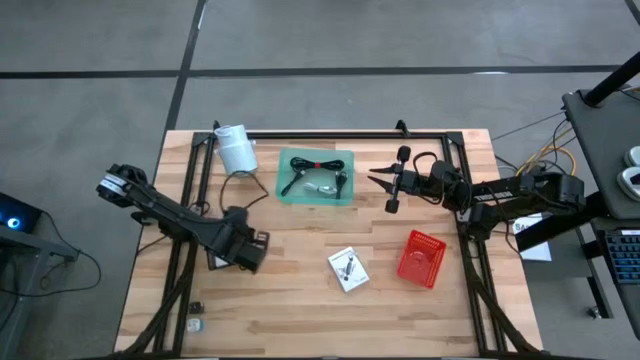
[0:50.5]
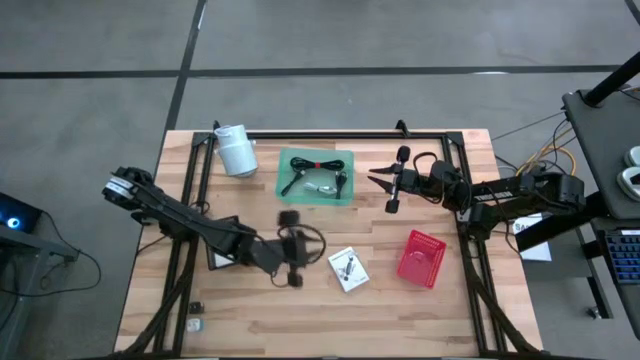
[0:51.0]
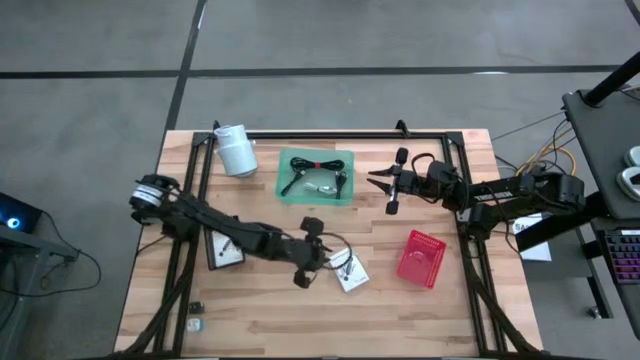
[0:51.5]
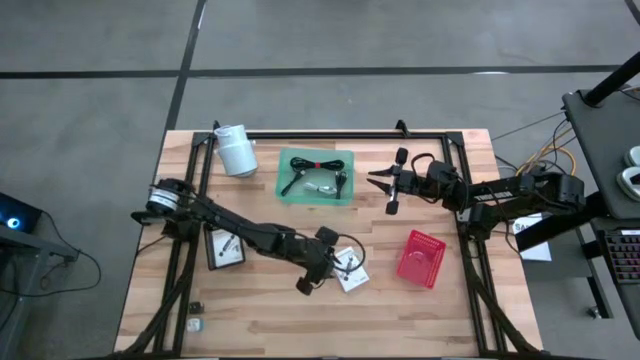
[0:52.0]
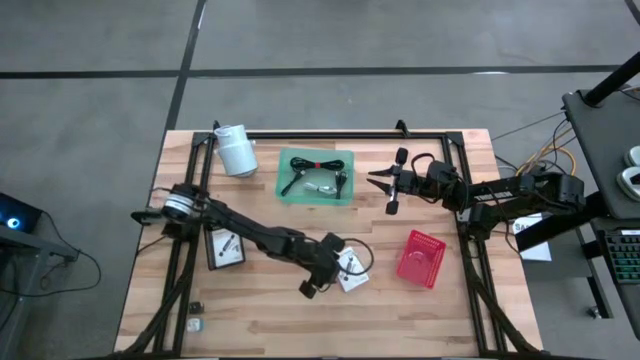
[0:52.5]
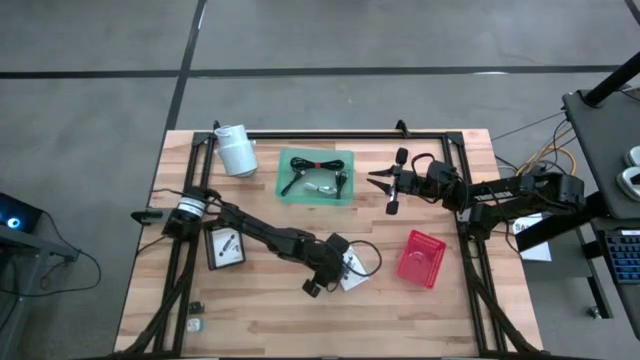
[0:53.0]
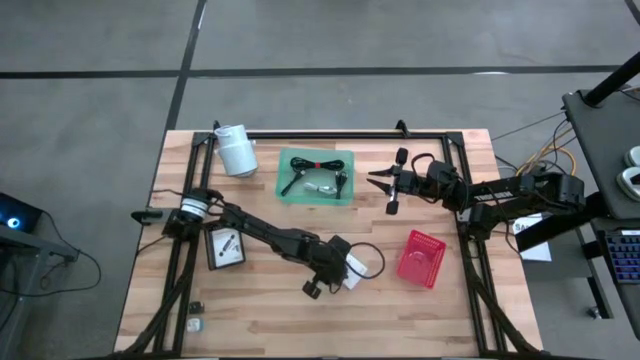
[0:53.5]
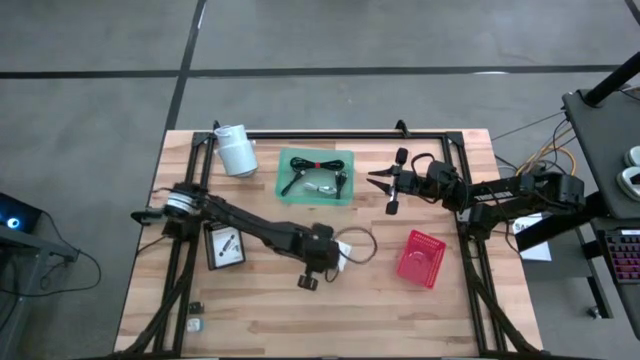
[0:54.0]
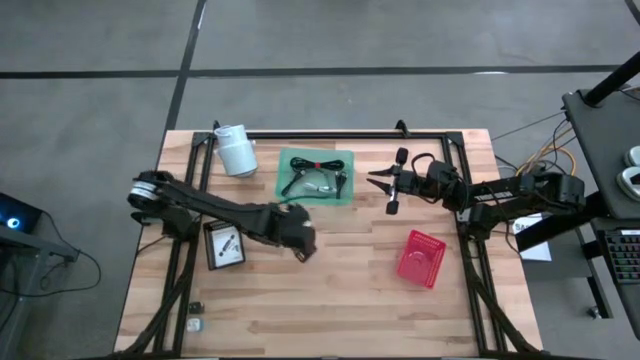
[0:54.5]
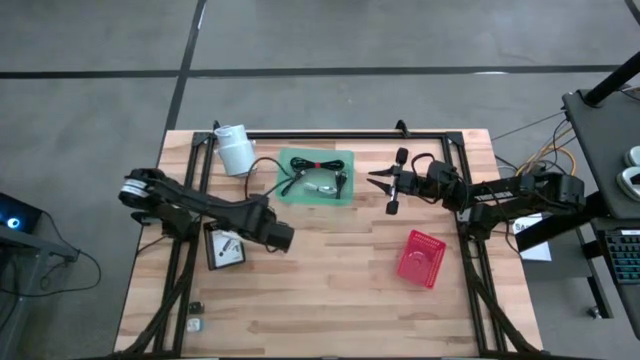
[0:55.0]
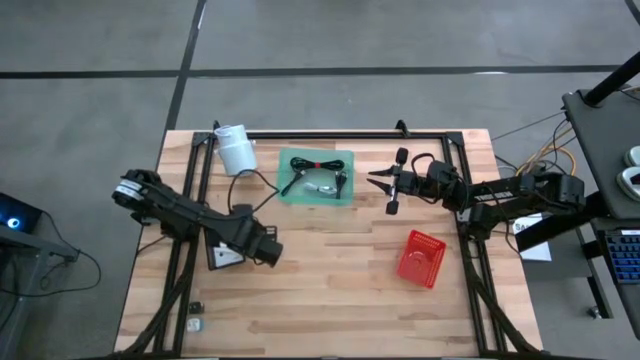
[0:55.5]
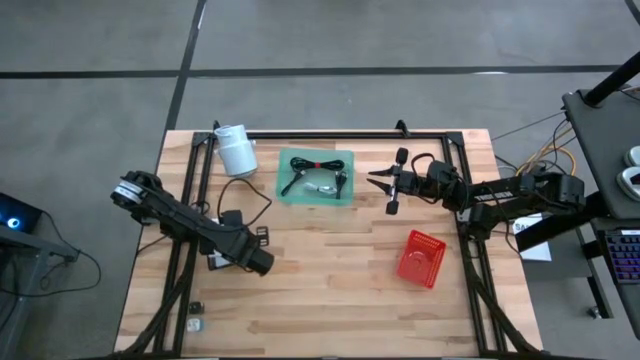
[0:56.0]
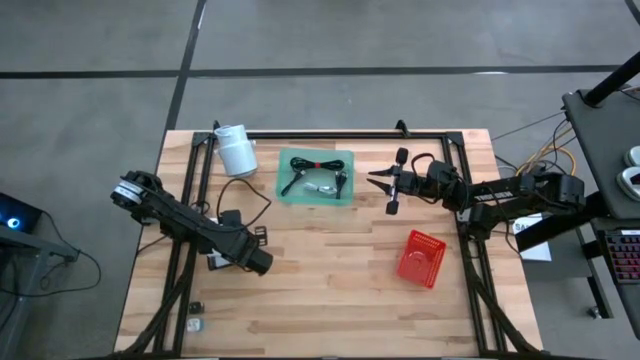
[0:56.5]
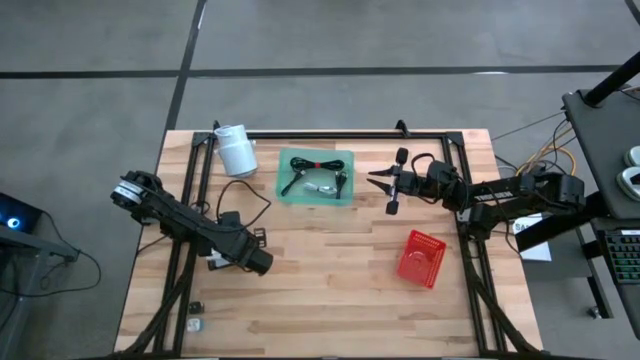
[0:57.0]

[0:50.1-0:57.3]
Task: Pick and place items into bin
Put the white card reader box into the black bin

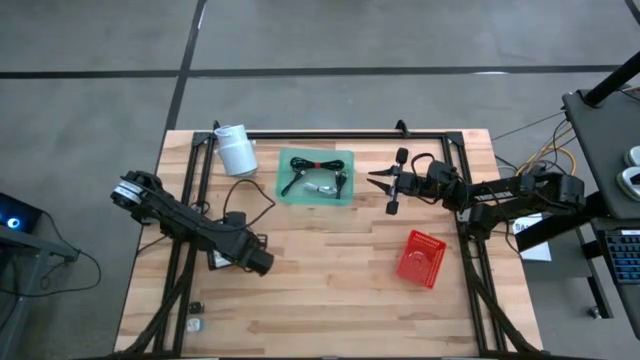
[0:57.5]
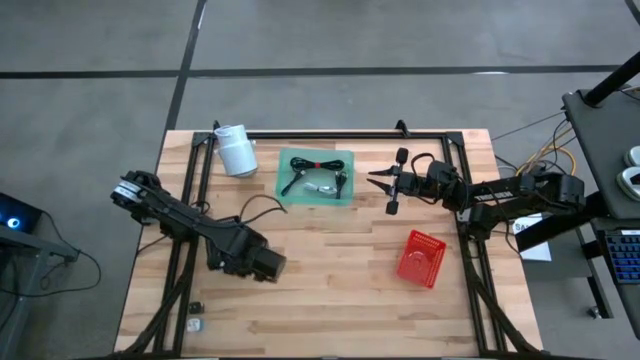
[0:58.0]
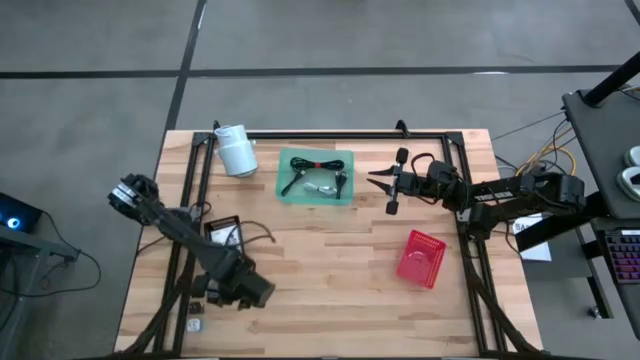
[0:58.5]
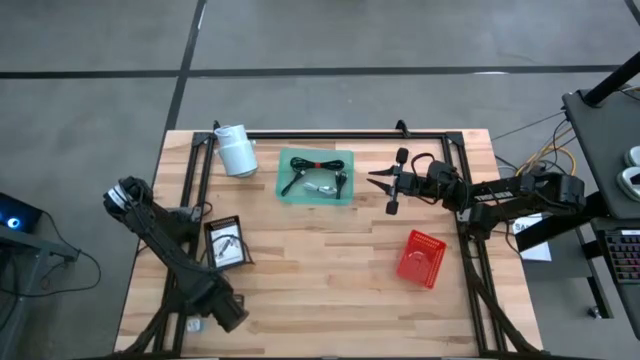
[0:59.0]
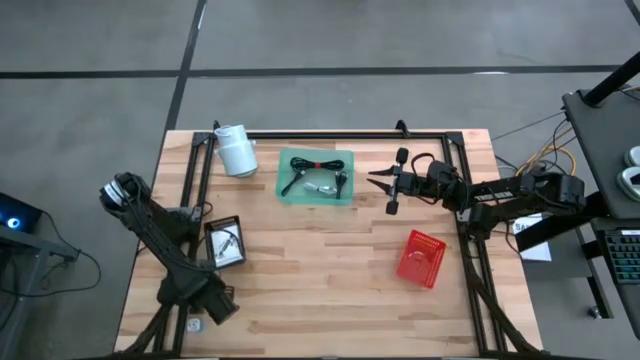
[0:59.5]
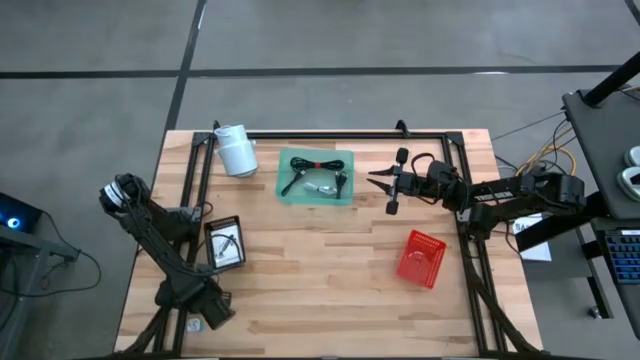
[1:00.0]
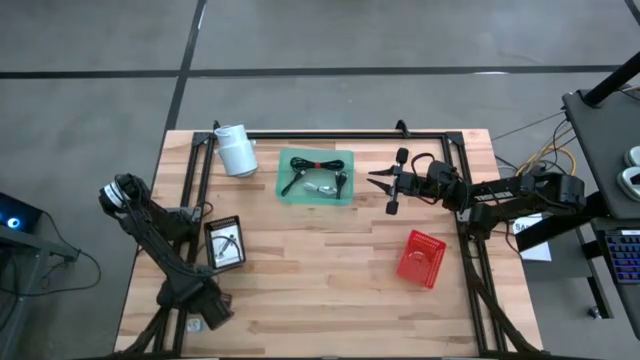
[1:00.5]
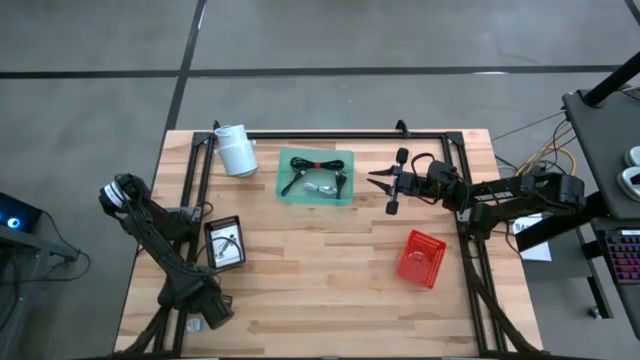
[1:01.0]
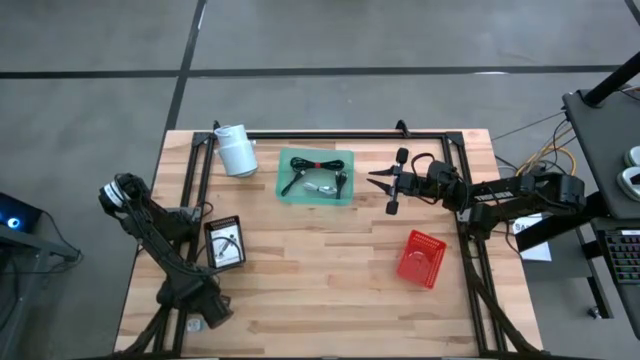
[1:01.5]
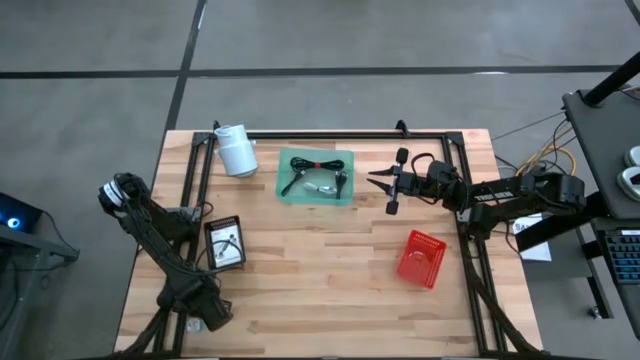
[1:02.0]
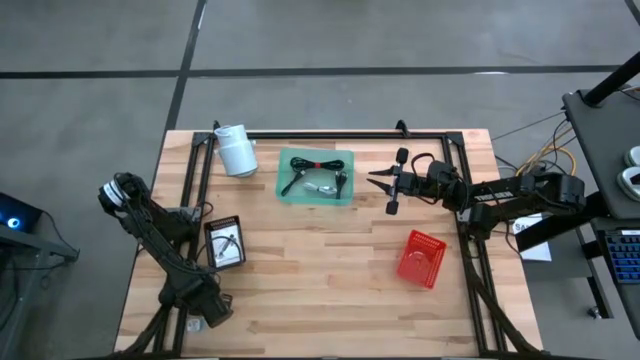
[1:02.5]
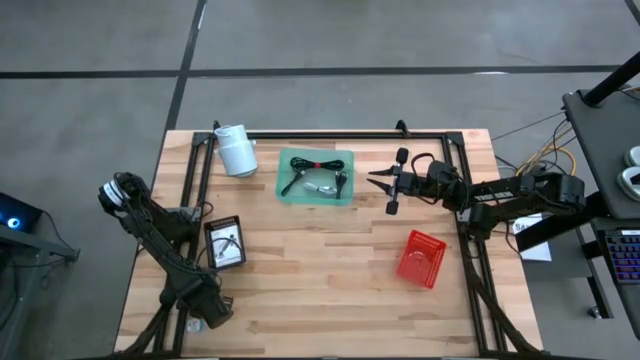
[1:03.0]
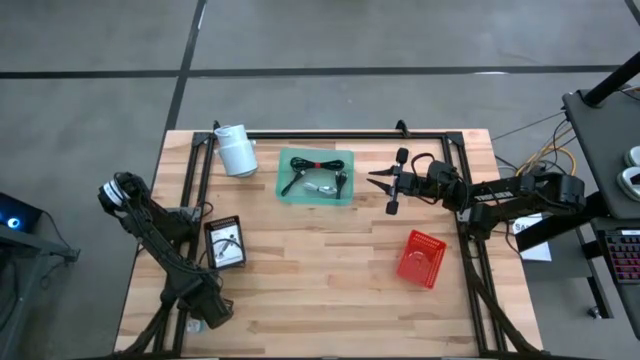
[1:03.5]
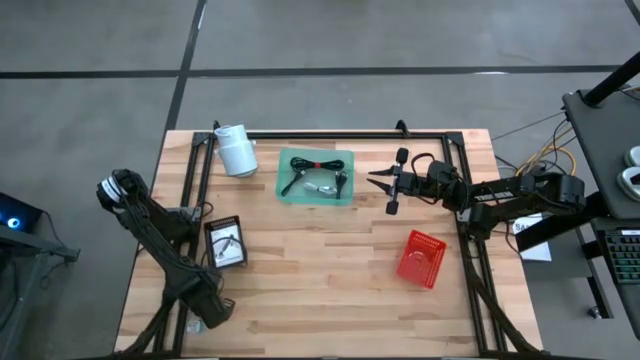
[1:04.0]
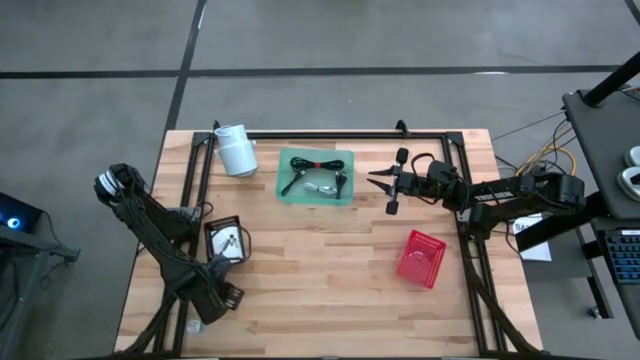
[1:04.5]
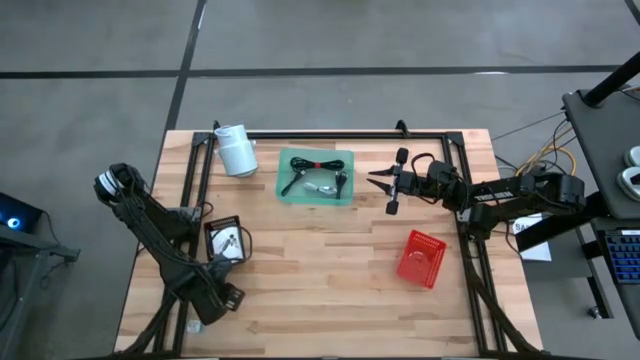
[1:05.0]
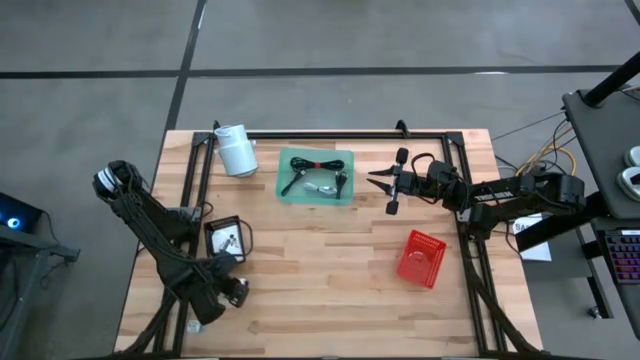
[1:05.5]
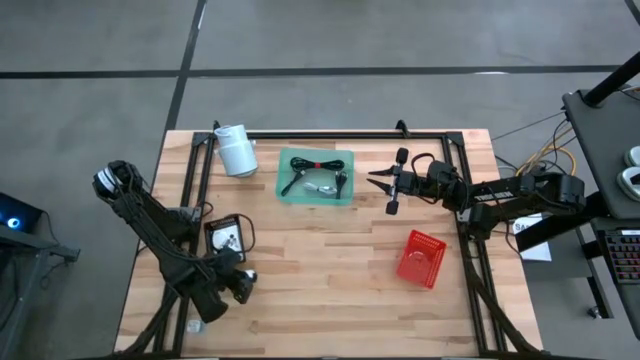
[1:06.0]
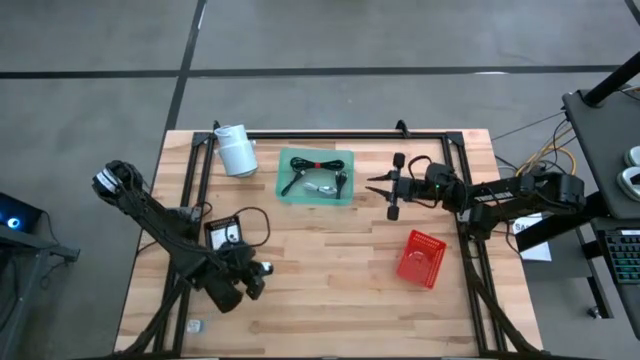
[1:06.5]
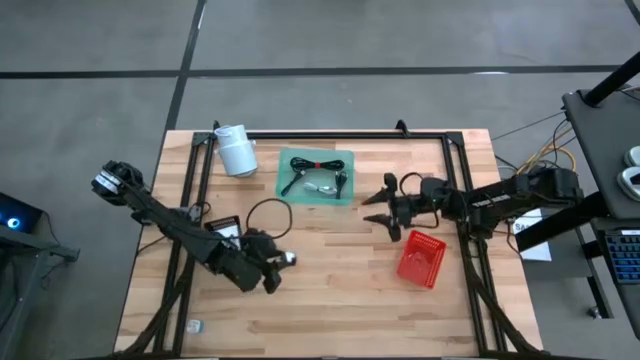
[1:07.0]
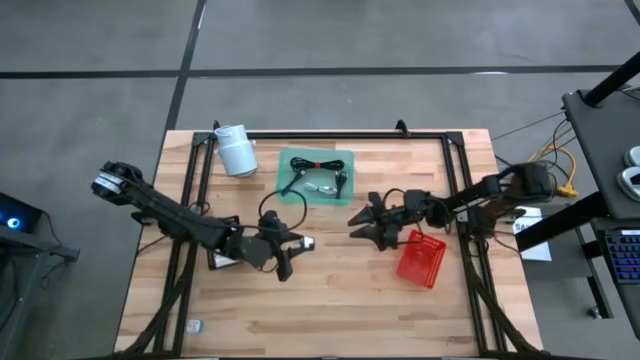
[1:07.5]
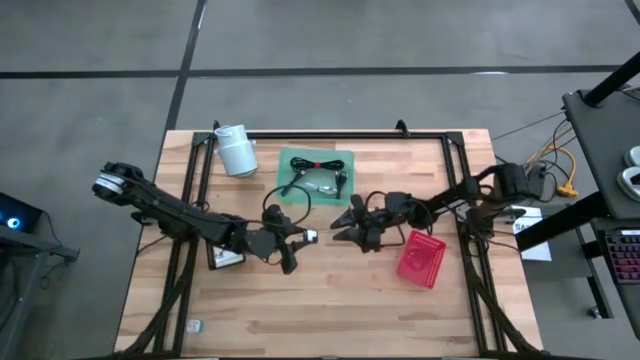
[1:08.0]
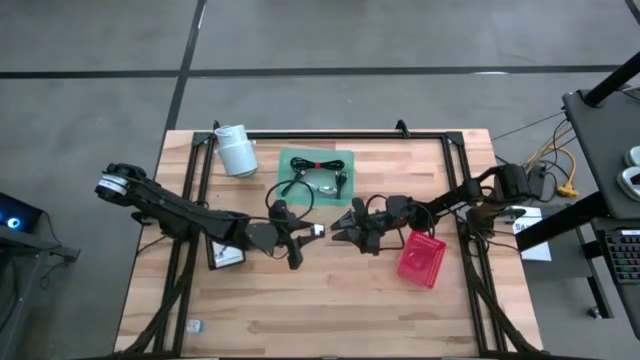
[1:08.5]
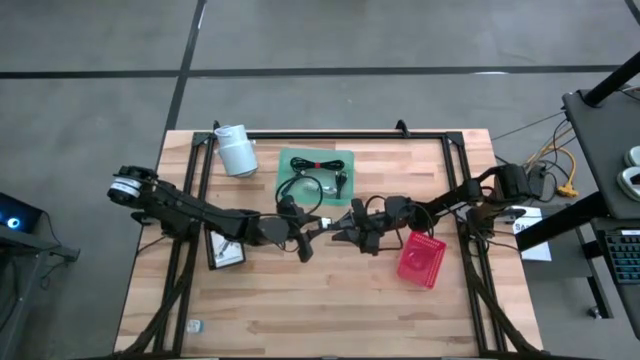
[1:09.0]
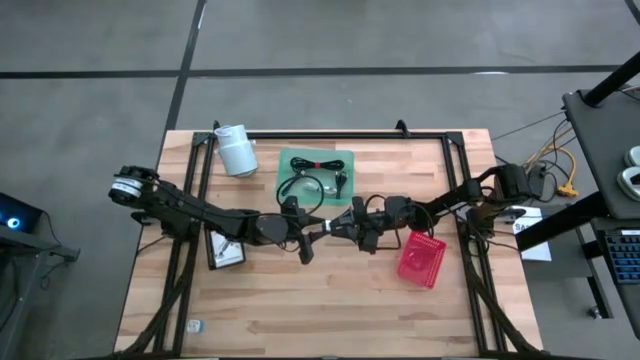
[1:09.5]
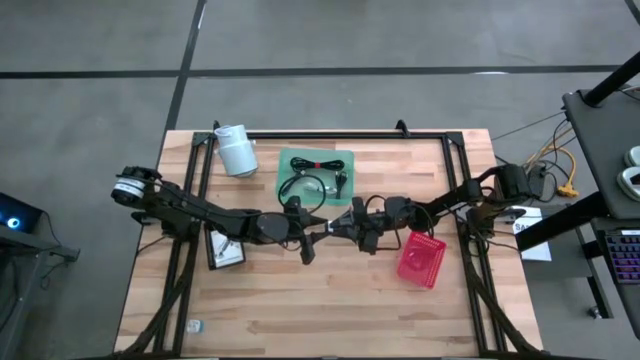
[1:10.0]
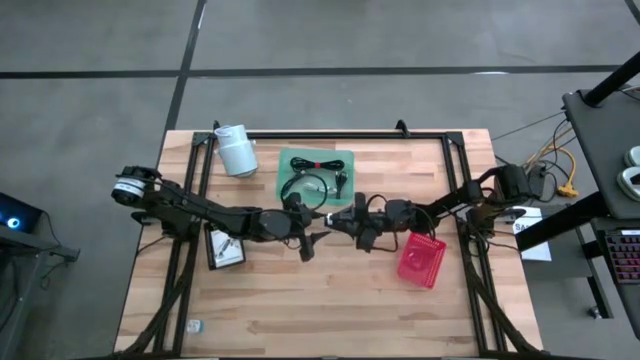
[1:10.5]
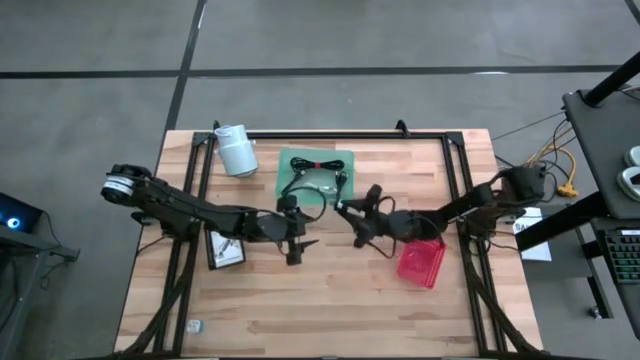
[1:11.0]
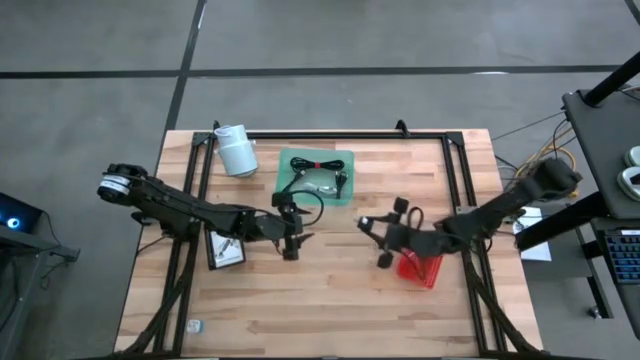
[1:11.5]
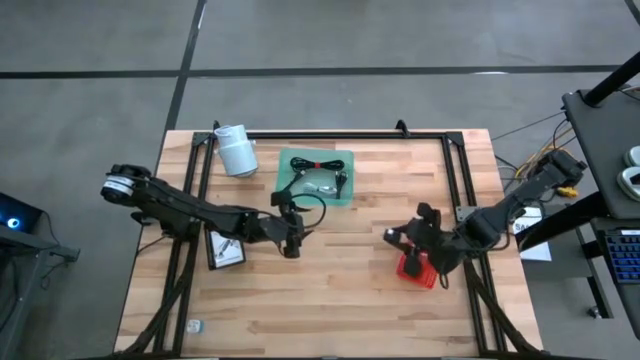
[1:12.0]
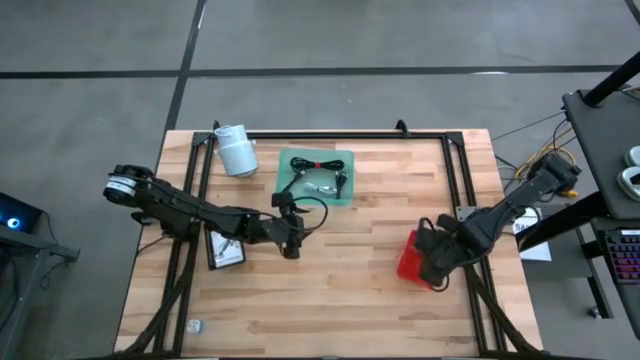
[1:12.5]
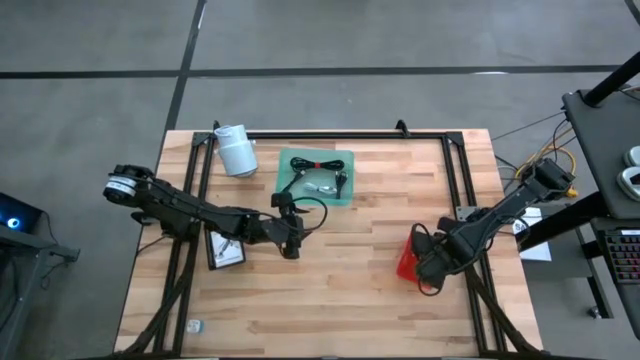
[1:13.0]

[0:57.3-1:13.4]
Put the black charger adapter into the red bin
